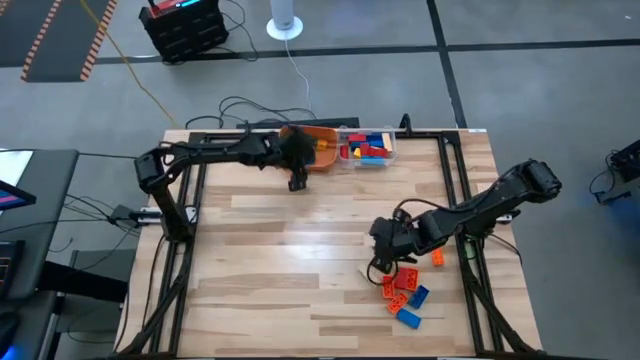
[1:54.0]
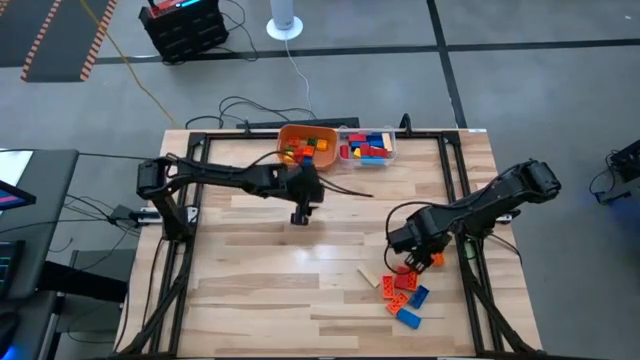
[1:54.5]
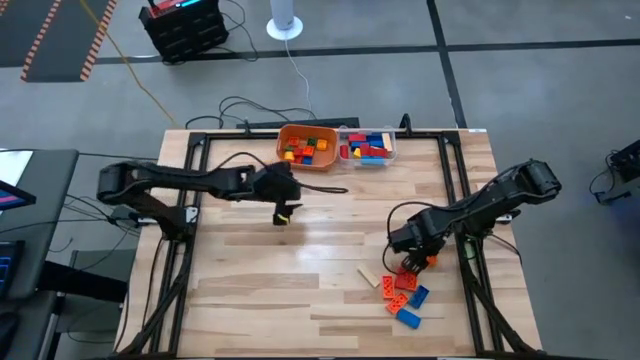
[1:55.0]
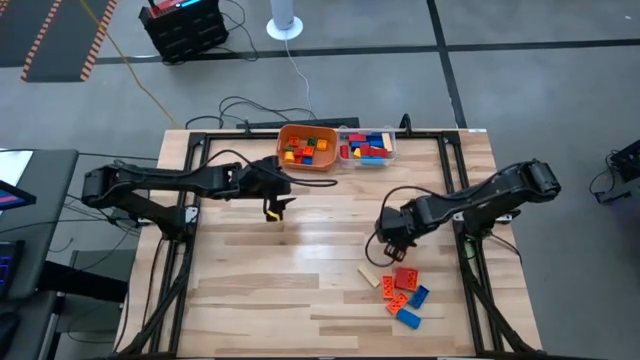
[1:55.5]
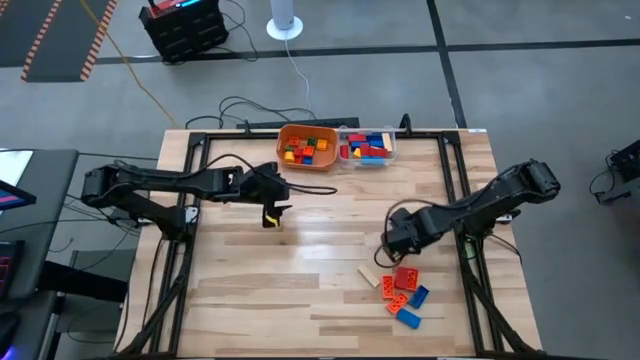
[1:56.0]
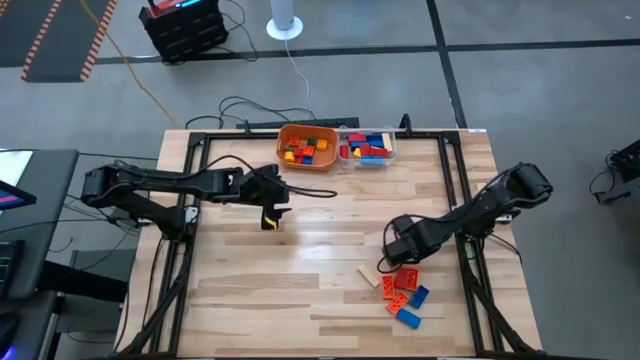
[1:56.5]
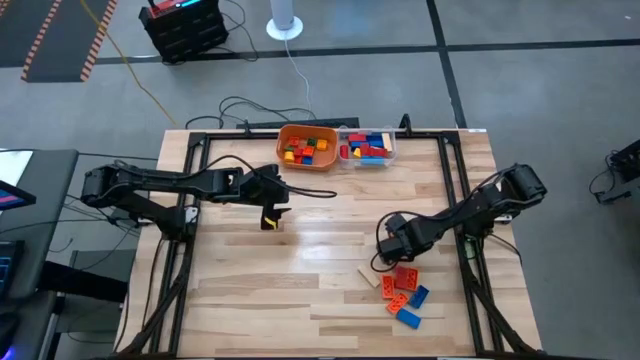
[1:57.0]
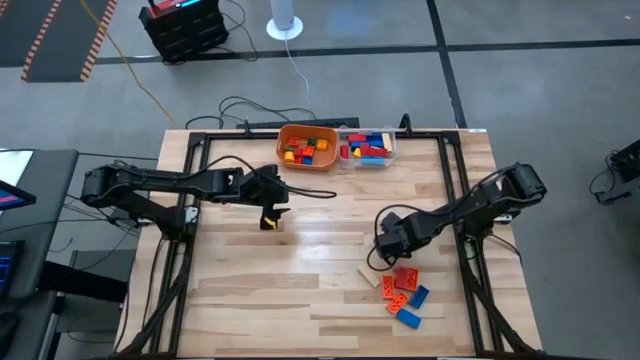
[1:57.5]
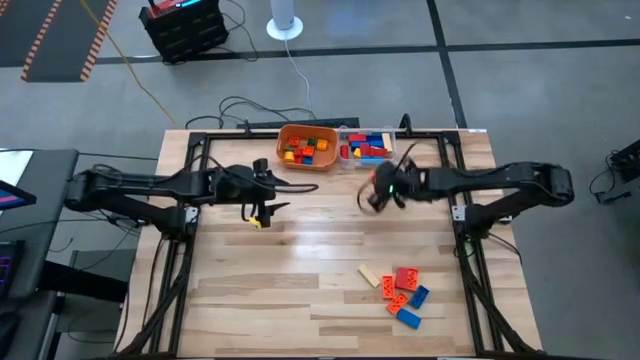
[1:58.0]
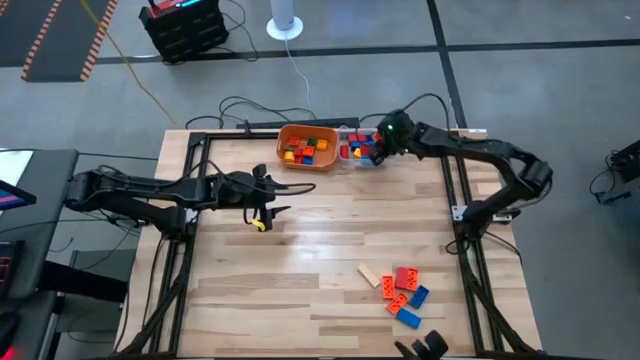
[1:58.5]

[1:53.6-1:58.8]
Task: Sort blocks by size
Put the middle right orange game piece into the transparent bin

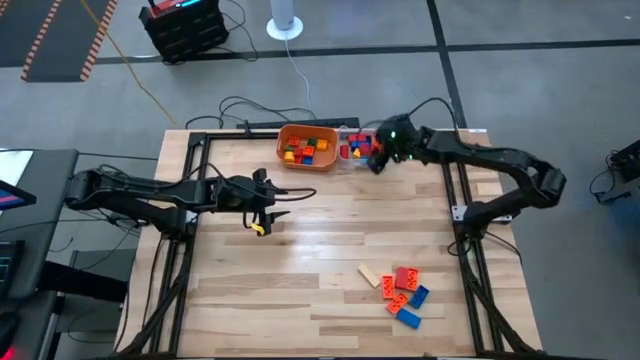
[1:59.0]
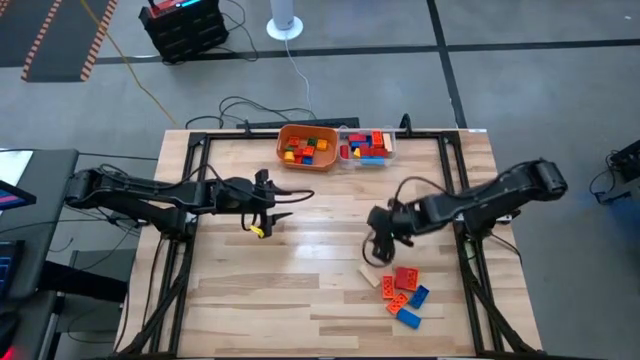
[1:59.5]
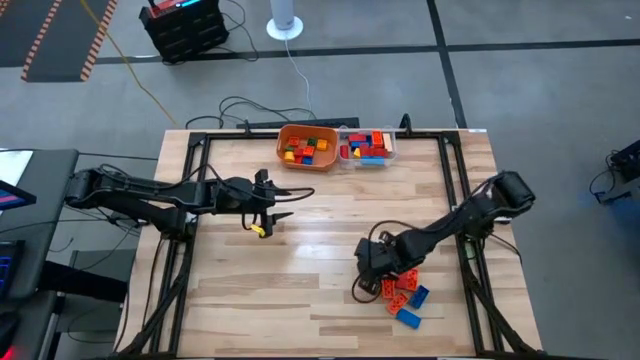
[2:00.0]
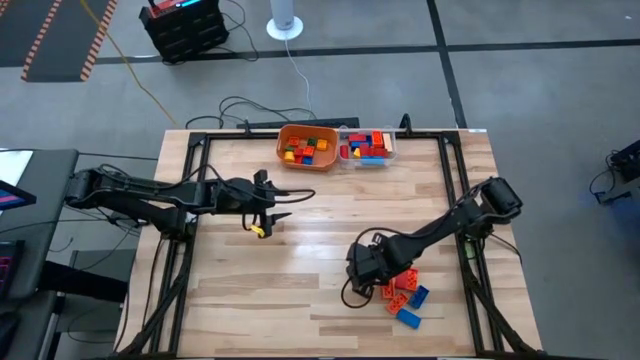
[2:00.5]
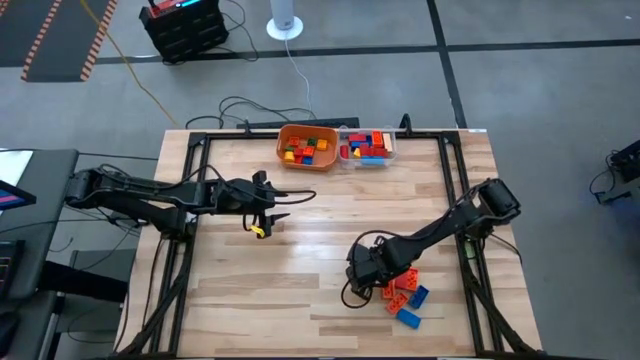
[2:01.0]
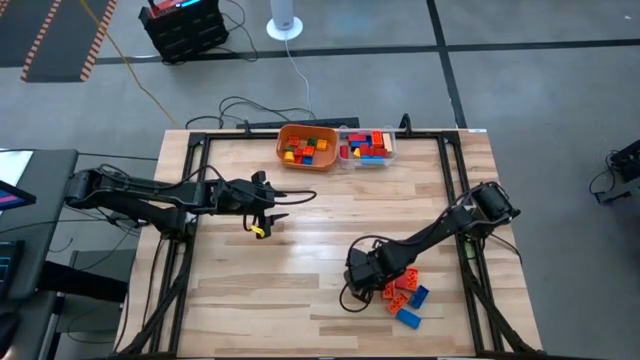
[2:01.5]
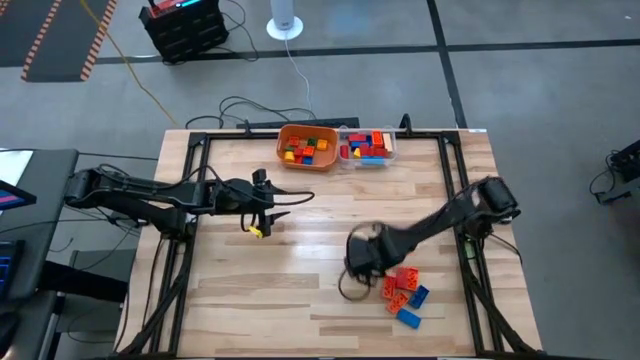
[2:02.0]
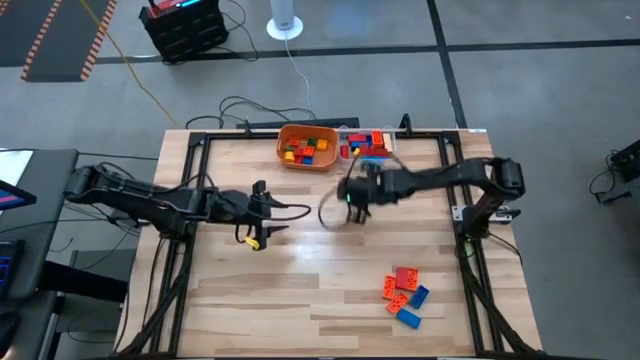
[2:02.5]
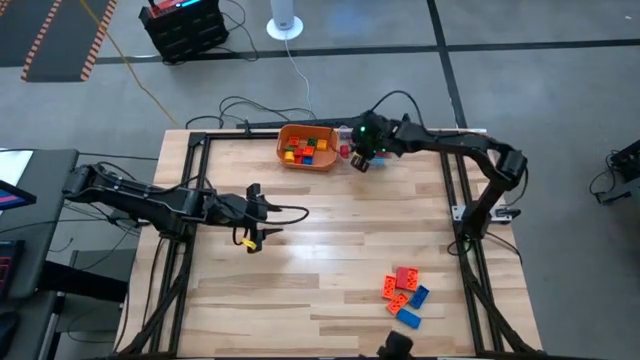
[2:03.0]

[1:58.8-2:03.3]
Put the wooden block into the transparent bin

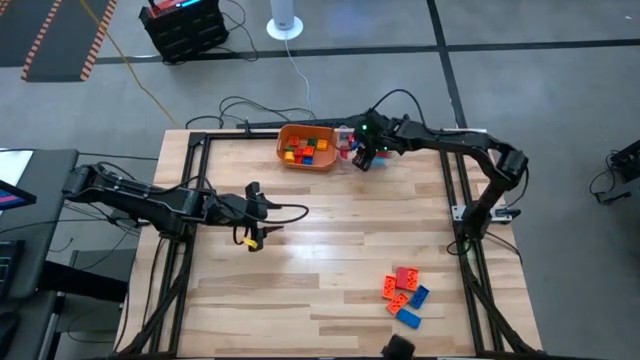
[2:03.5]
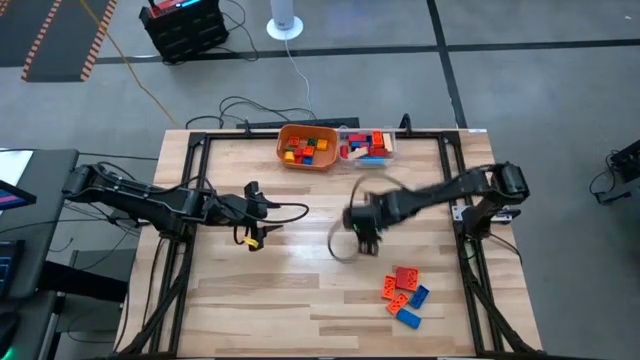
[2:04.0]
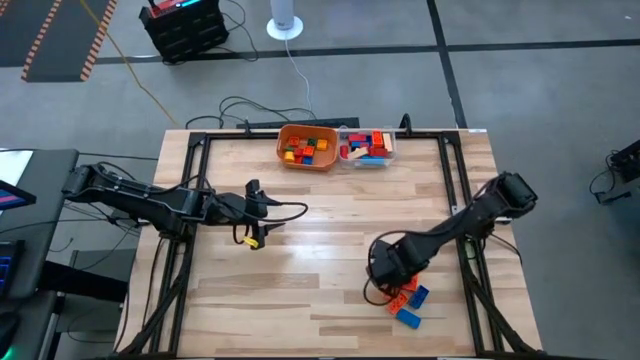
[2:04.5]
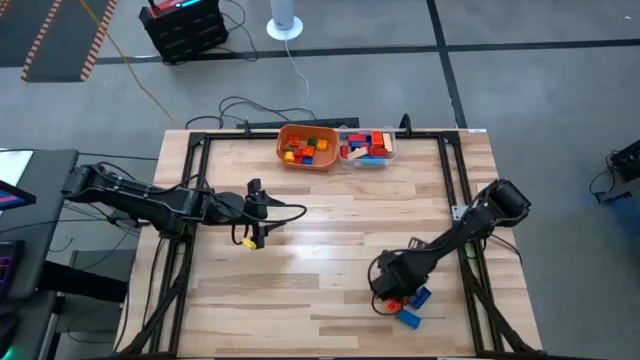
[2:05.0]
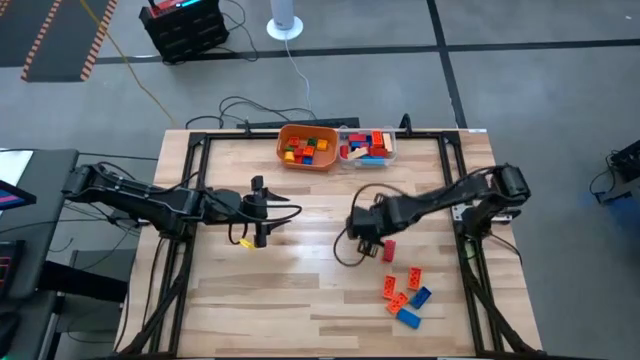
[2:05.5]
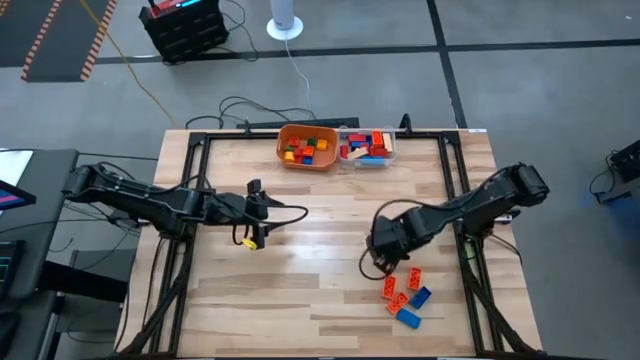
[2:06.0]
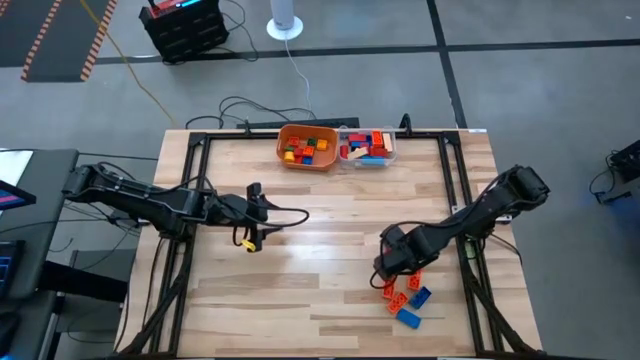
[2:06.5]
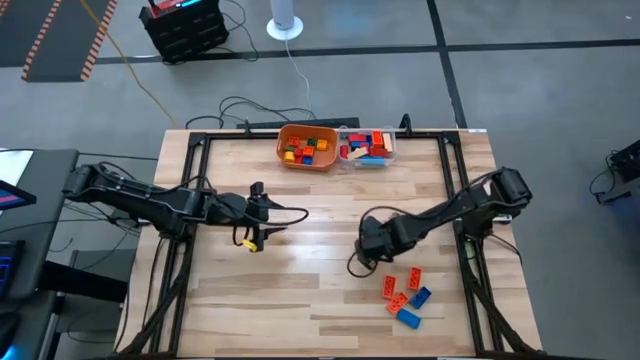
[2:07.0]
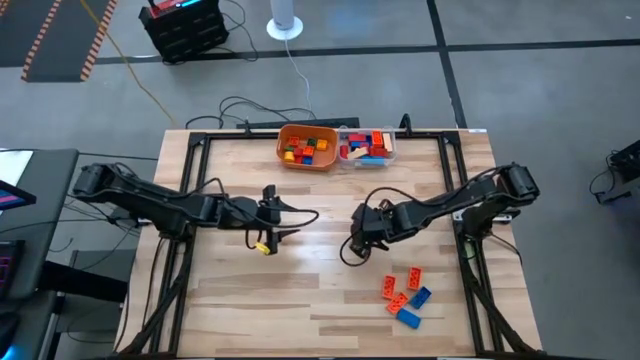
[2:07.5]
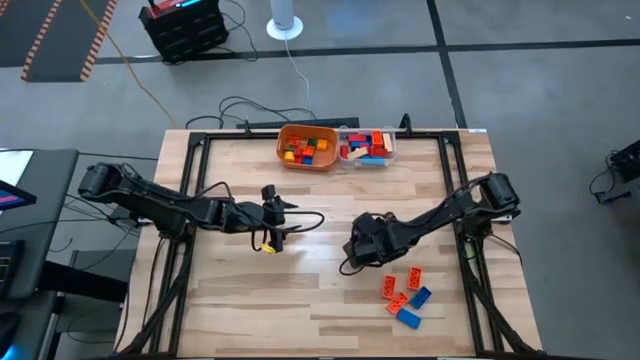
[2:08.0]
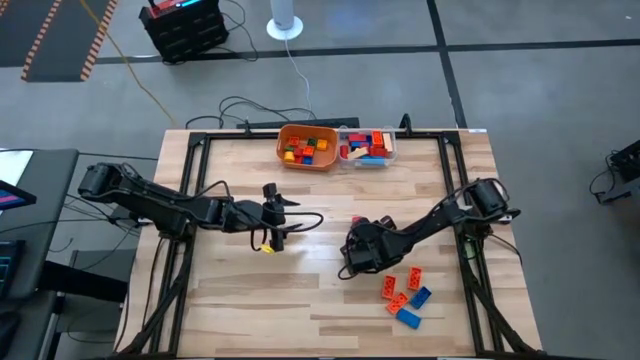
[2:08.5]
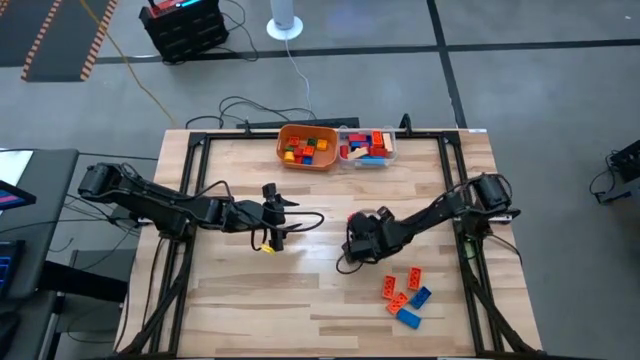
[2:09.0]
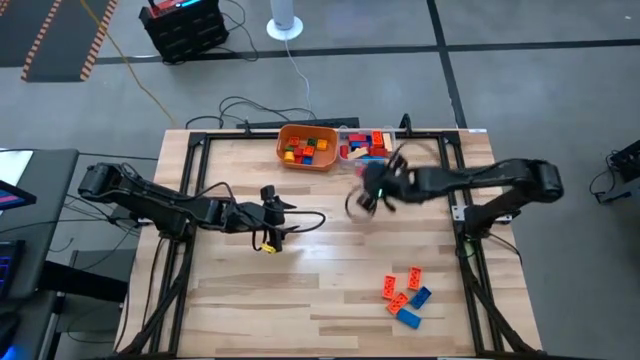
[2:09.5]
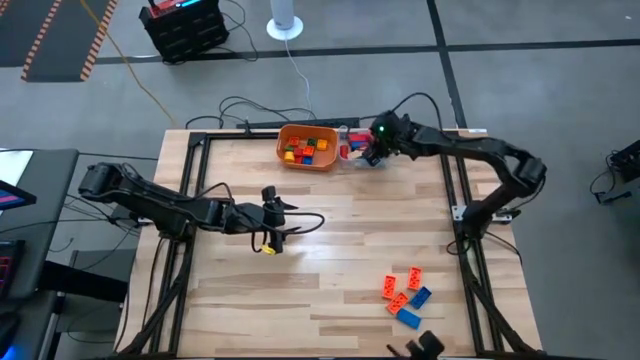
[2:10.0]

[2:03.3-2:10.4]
Put the red block into the transparent bin

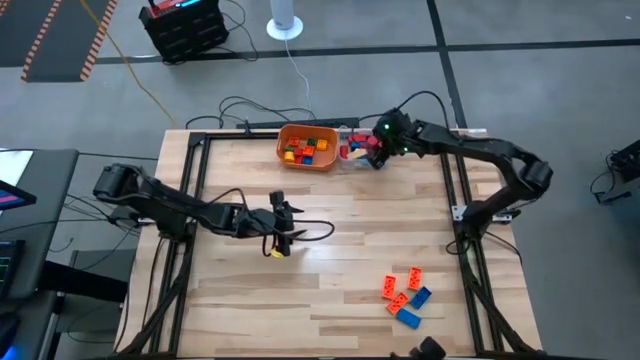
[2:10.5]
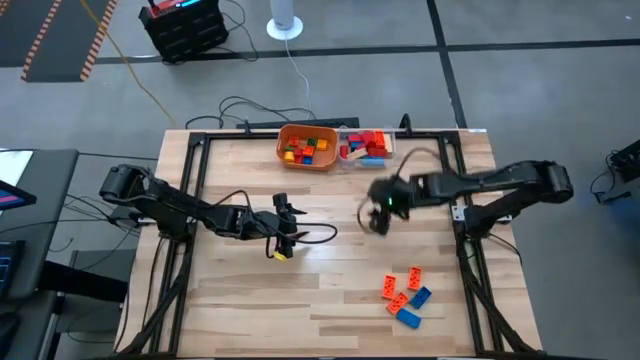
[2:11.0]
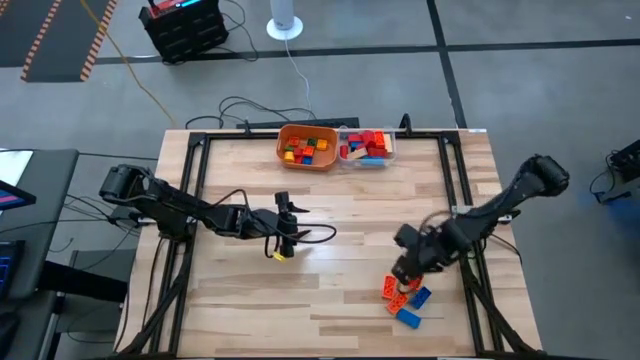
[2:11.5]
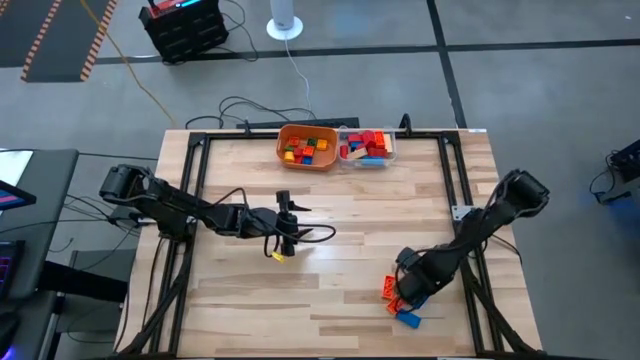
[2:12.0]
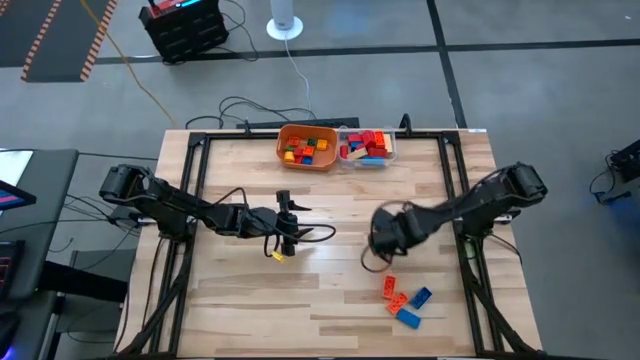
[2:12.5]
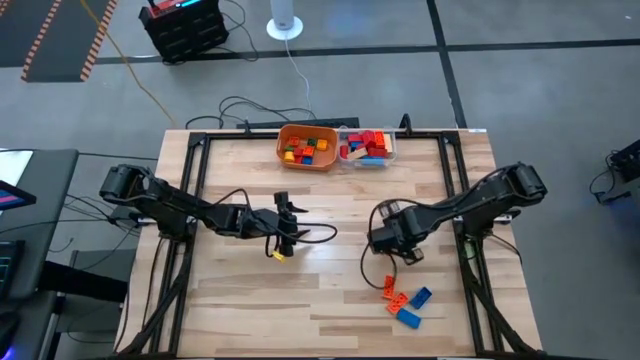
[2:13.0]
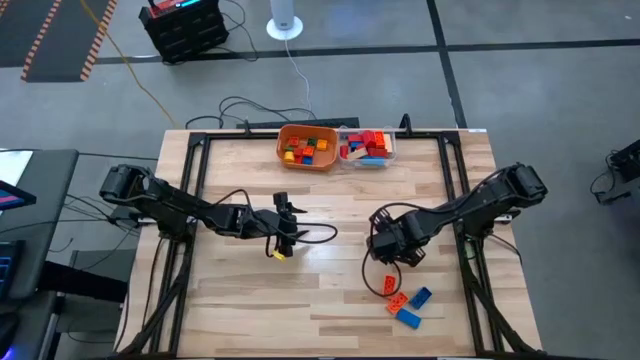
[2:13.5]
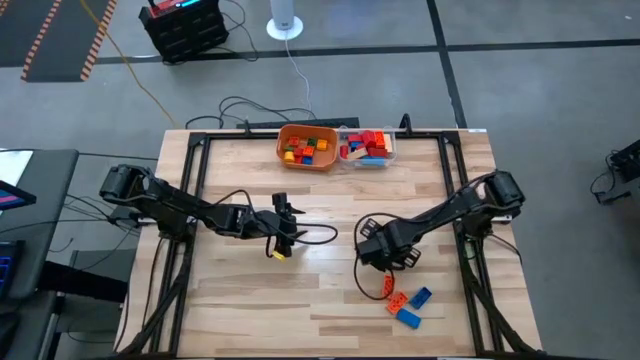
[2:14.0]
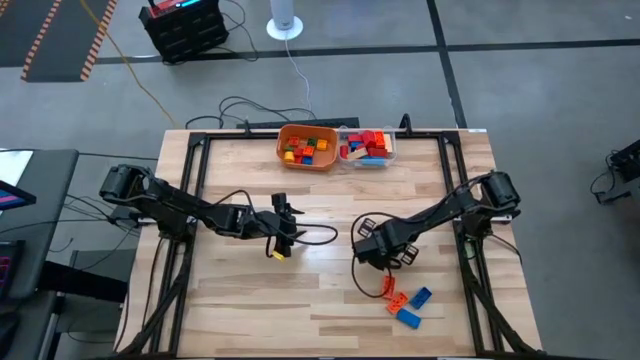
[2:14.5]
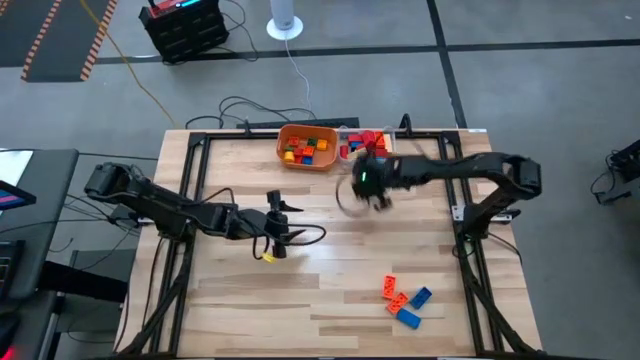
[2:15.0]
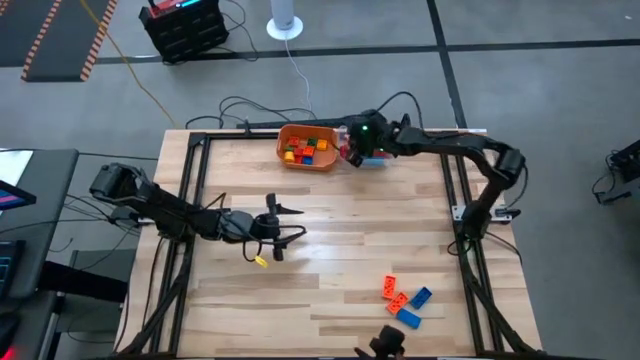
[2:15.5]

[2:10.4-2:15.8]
Put the bottom right orange game piece into the transparent bin
